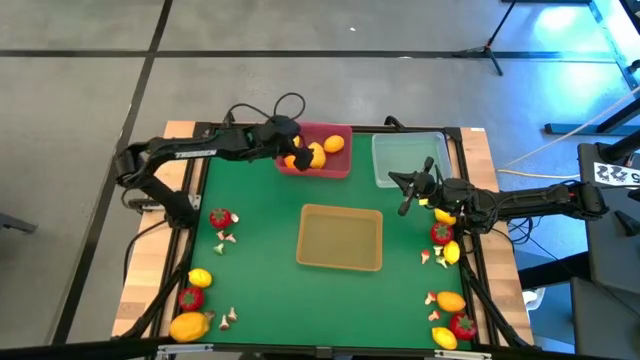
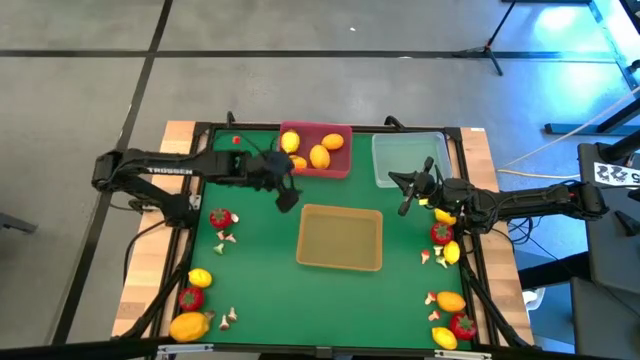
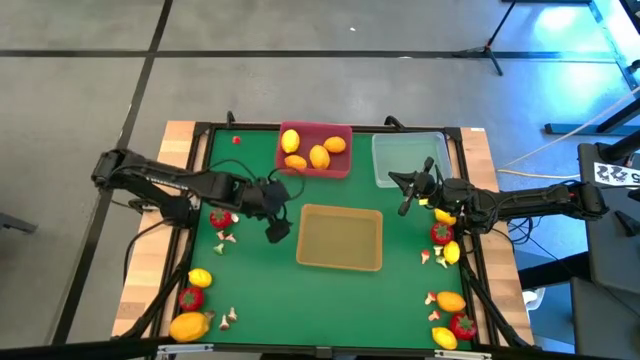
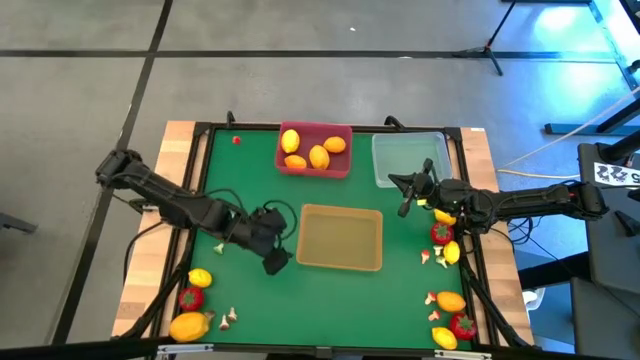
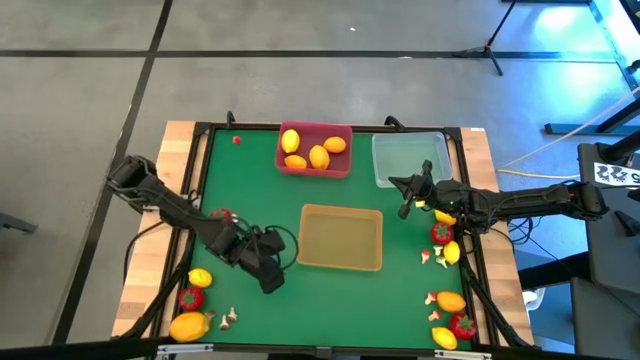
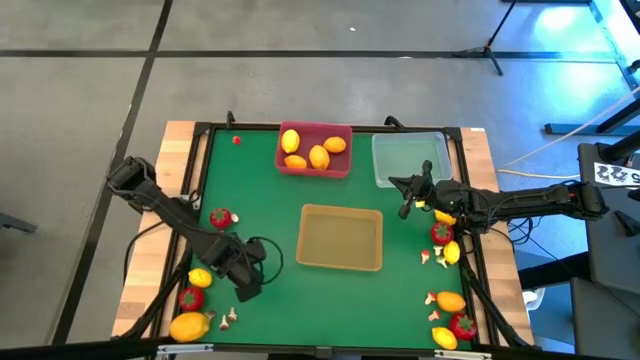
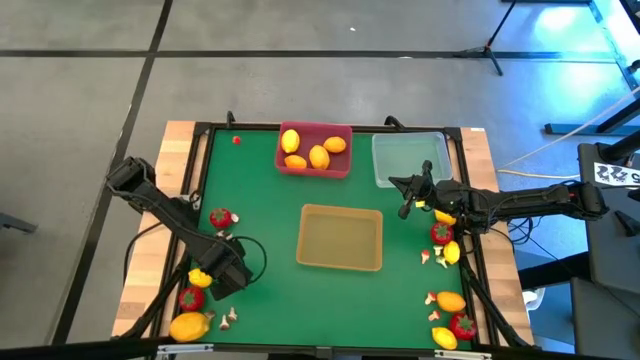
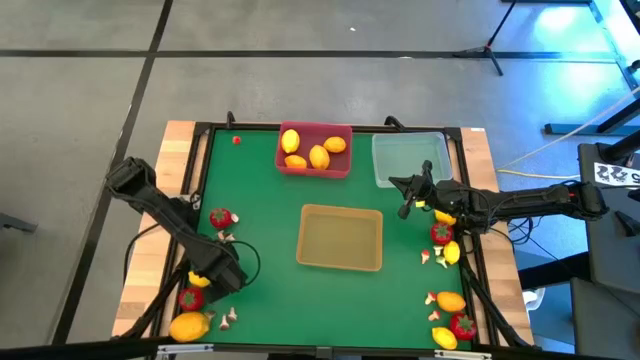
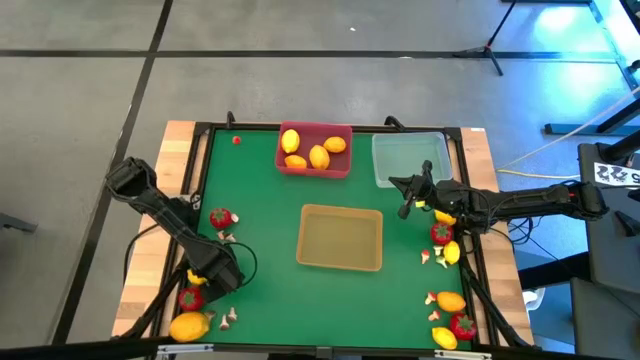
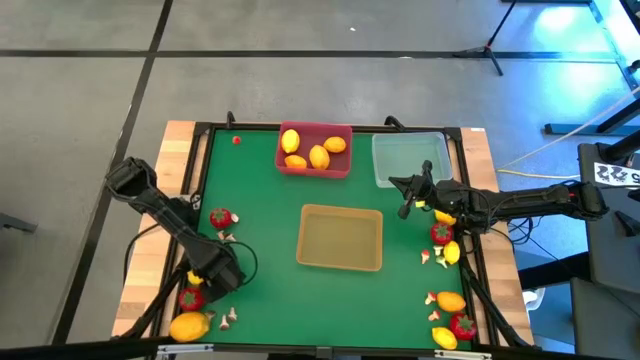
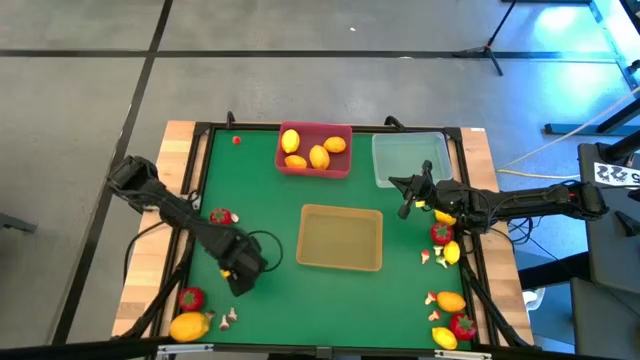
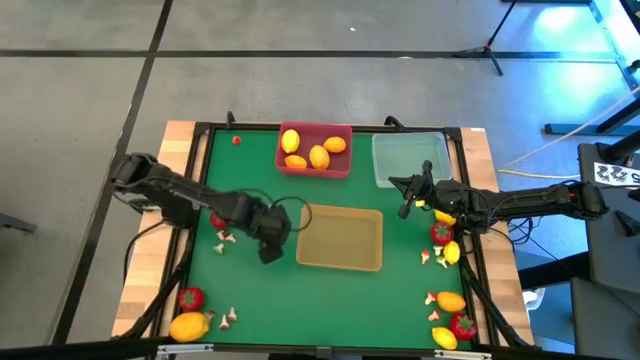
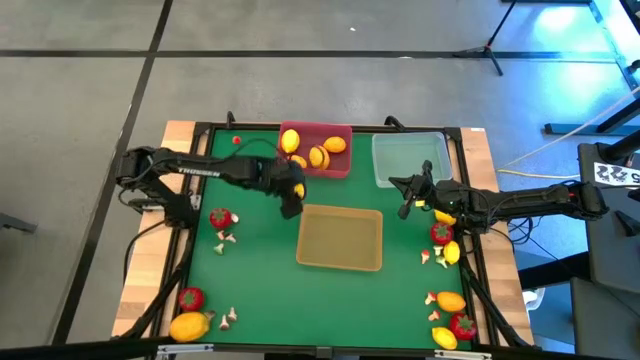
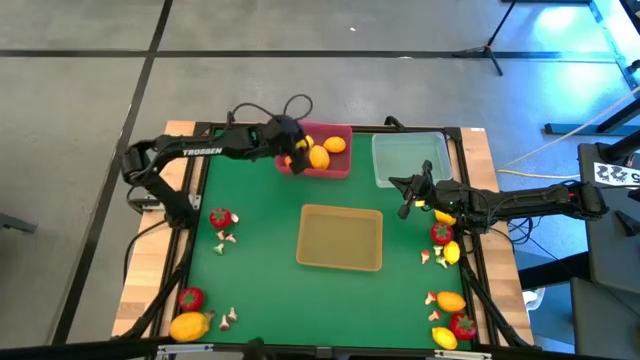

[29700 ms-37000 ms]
Task: Sort produce into baskets
Put the yellow lemon into the red bin

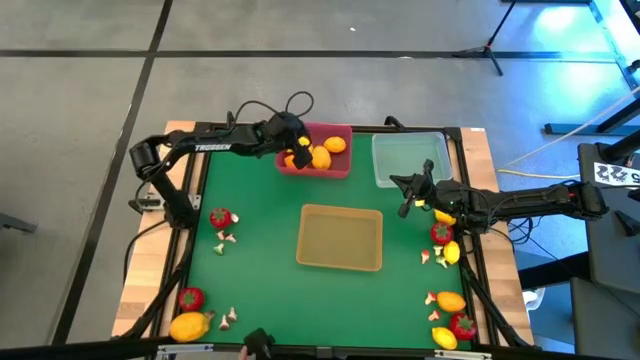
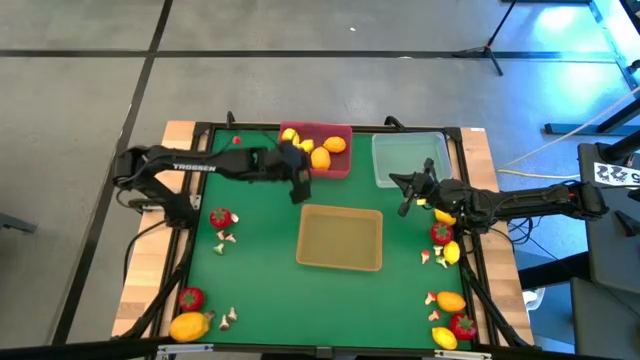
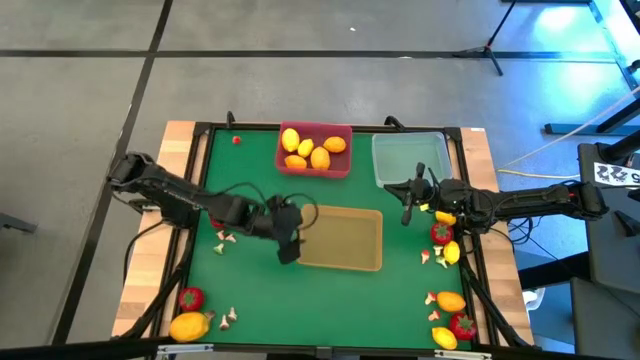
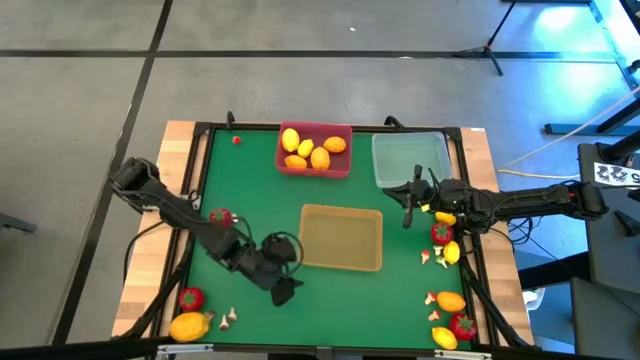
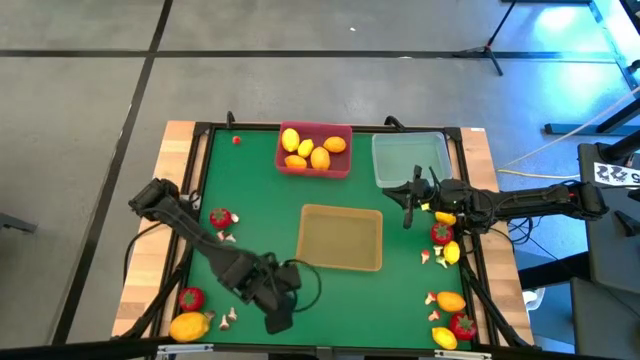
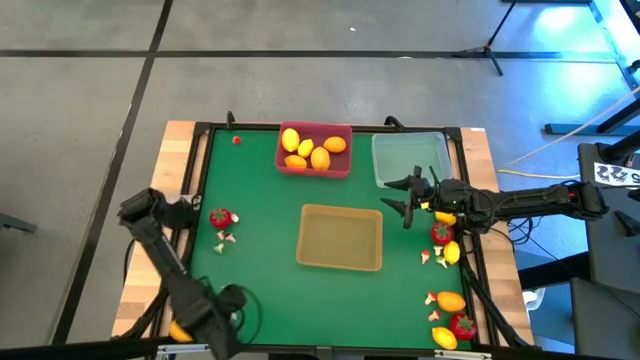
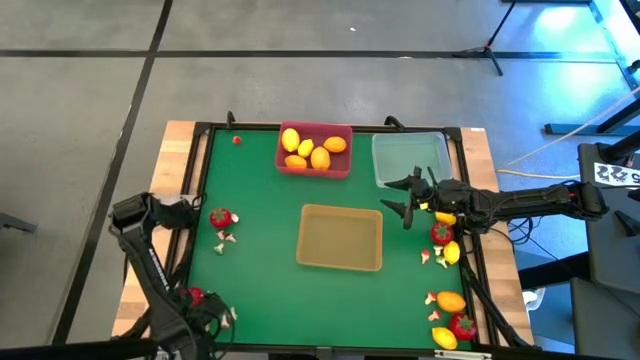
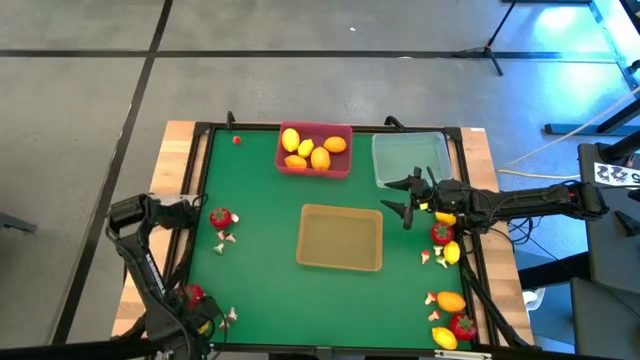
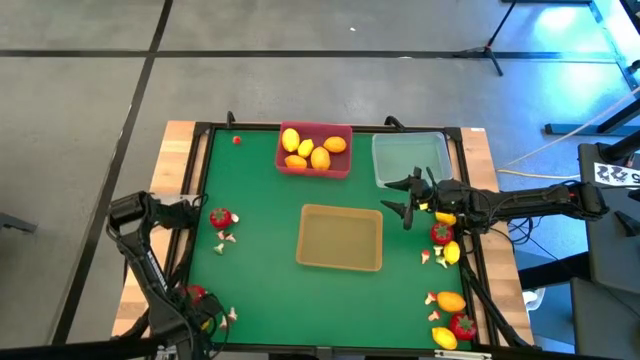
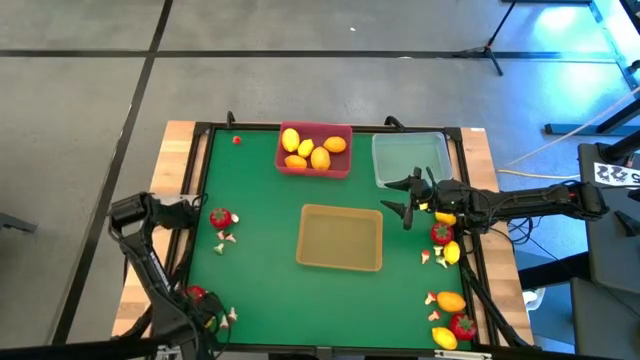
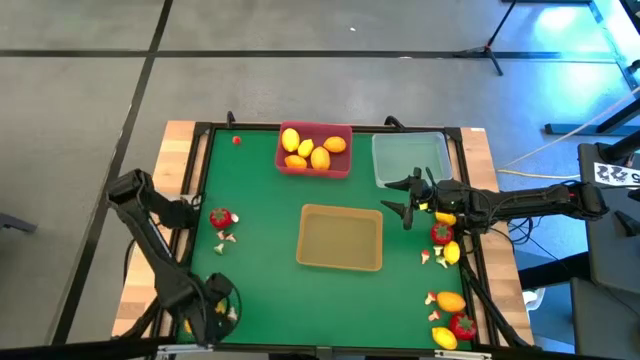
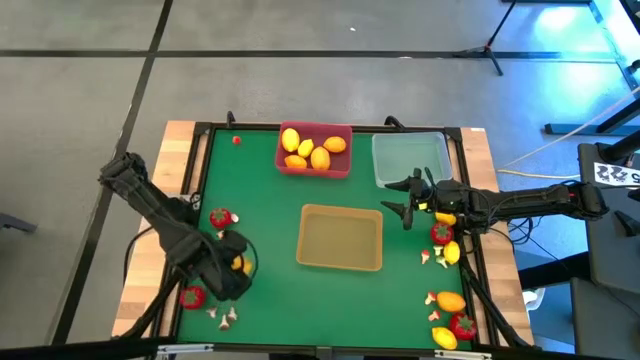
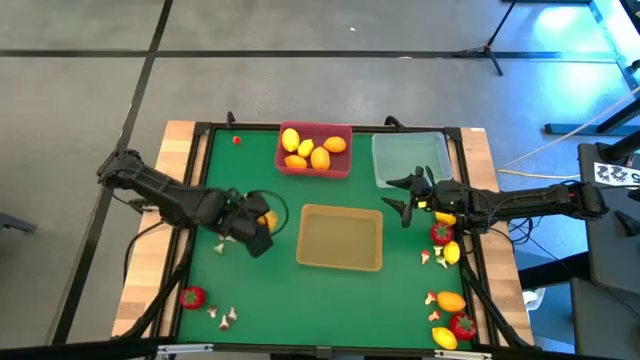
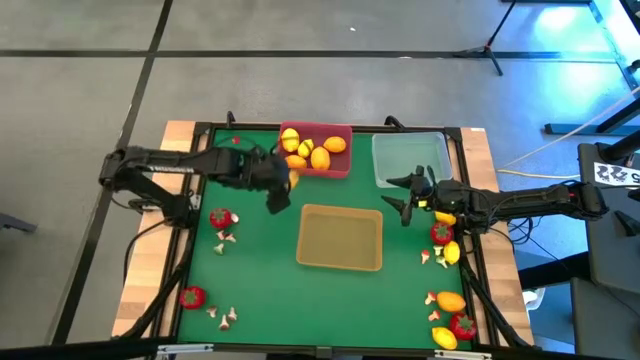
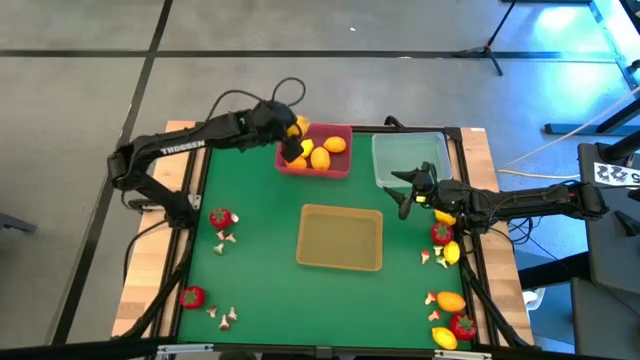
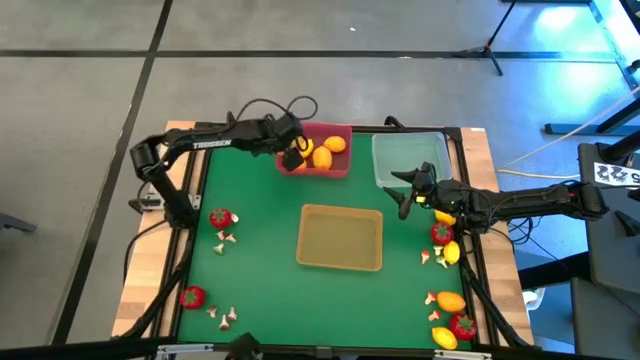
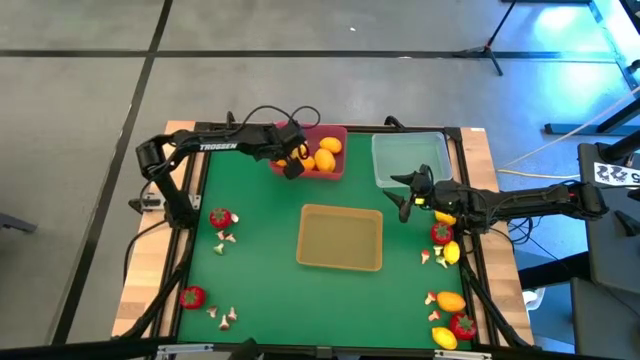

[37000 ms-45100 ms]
Put the yellow lemon into the red bin

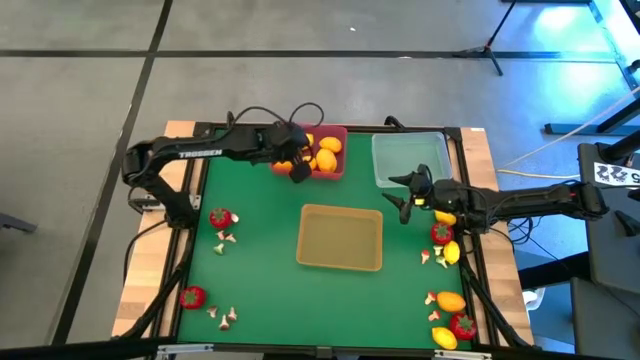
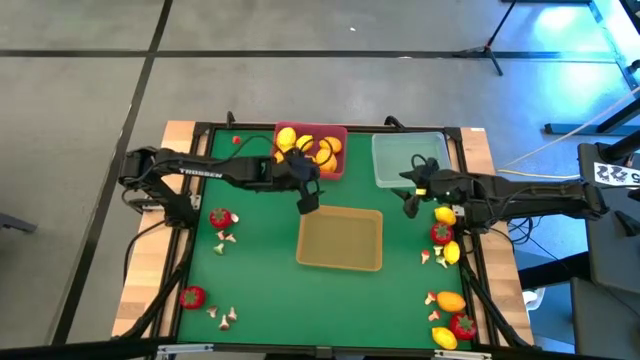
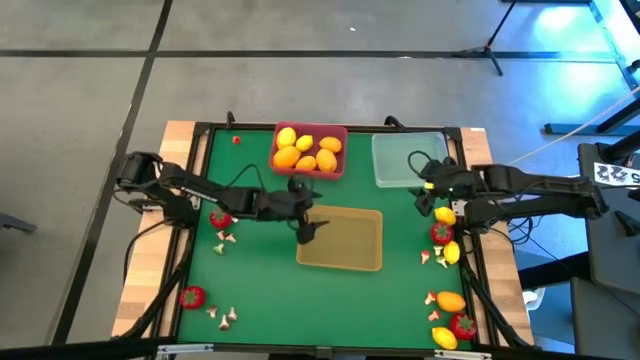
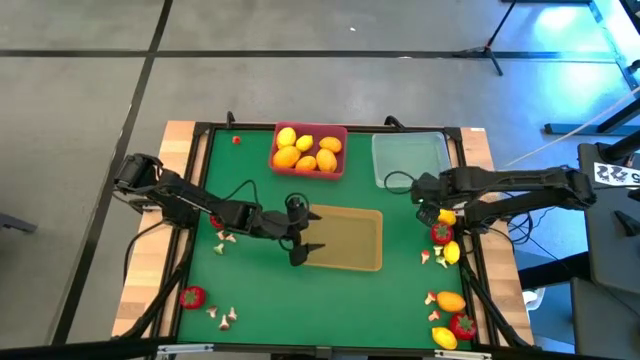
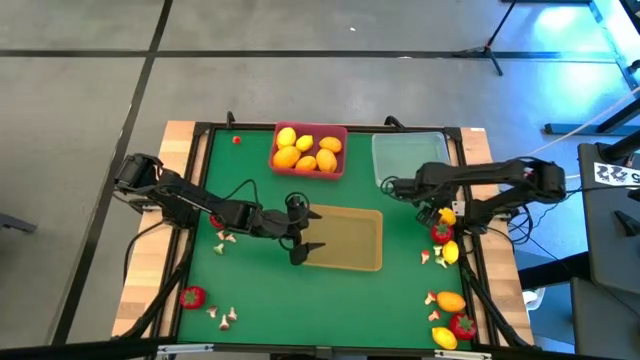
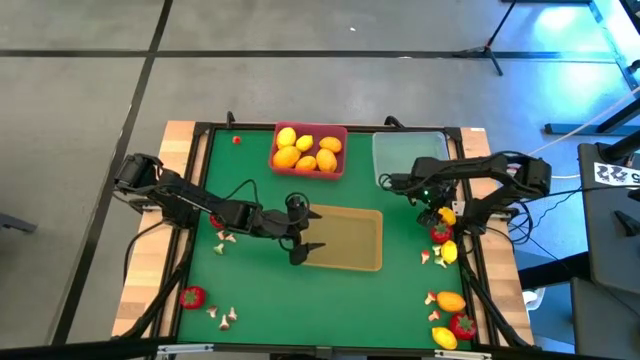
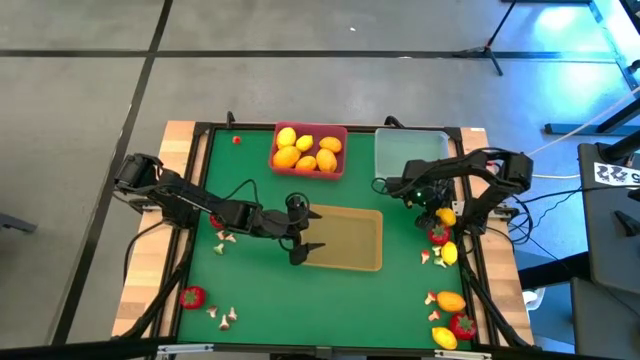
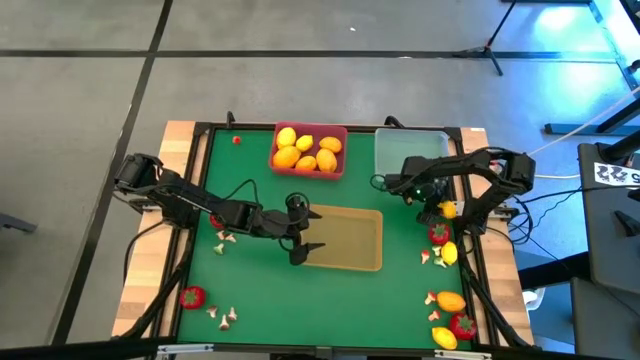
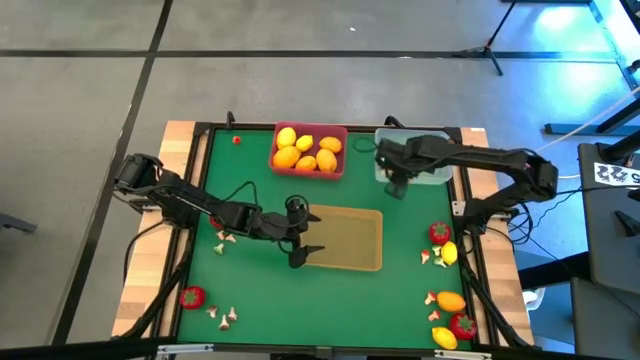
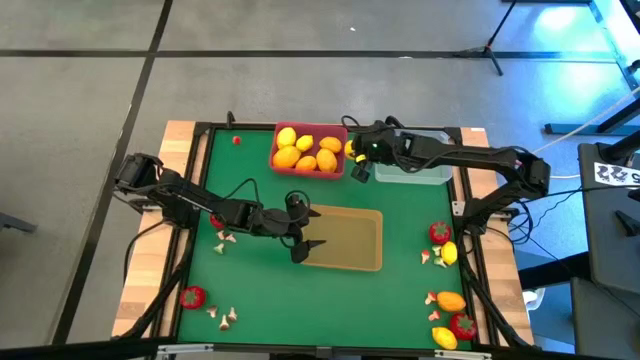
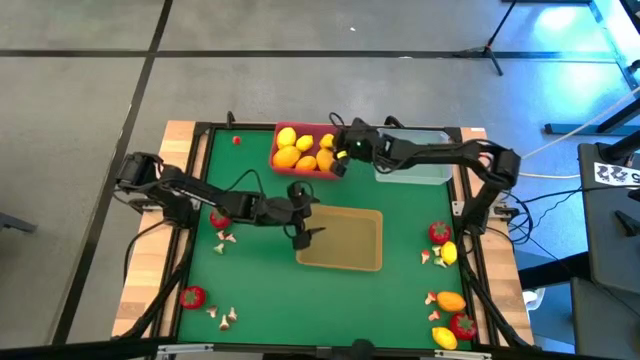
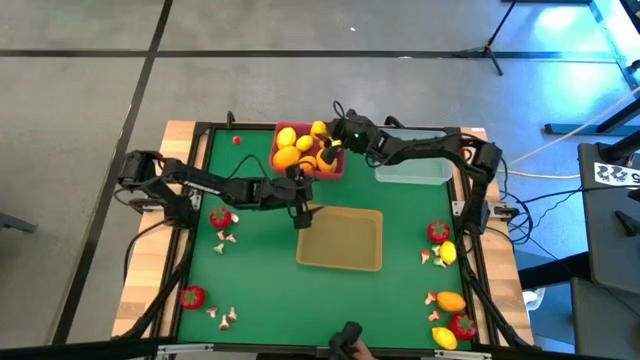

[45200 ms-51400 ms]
Put the yellow lemon into the red bin
